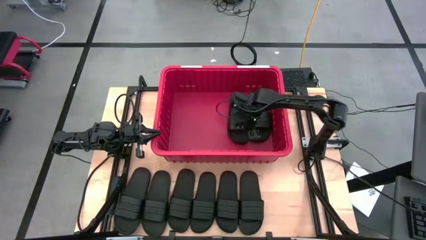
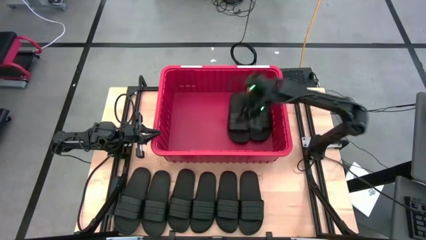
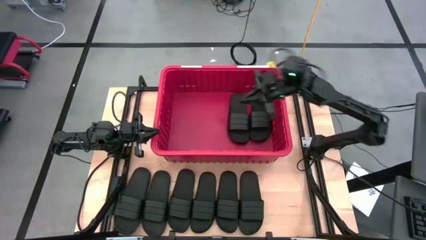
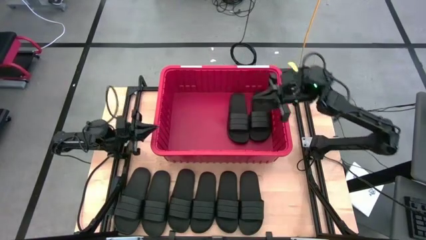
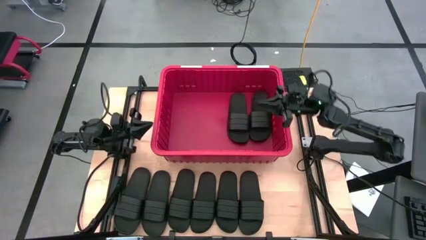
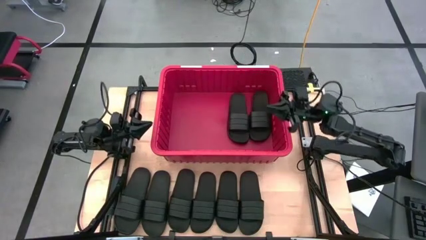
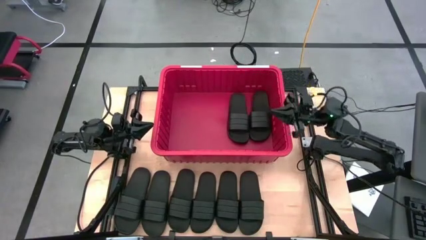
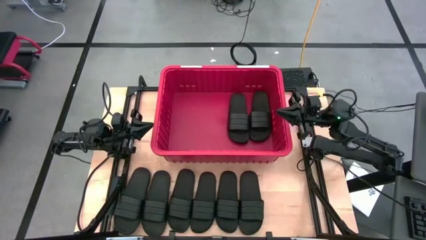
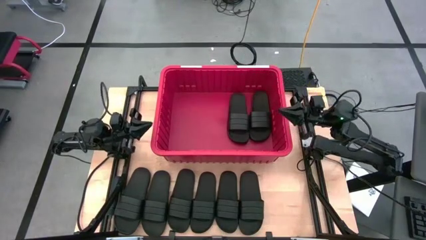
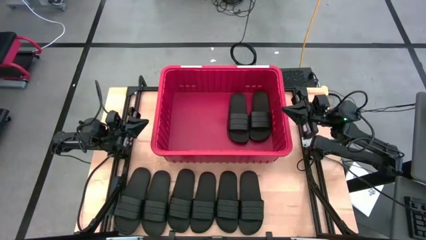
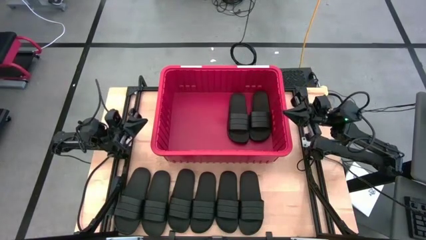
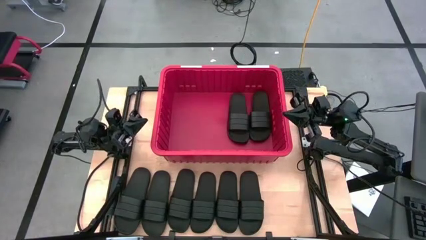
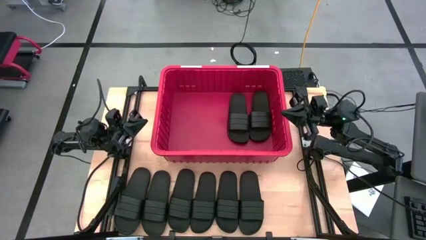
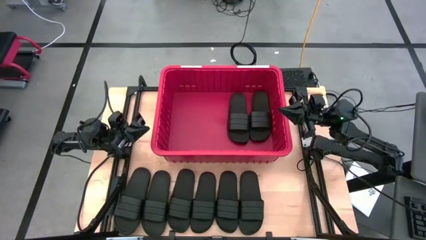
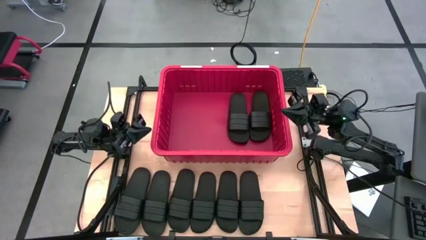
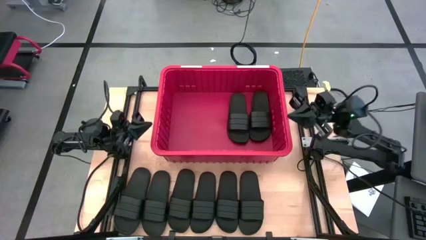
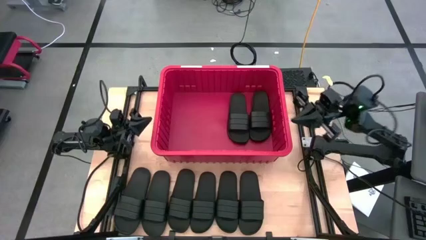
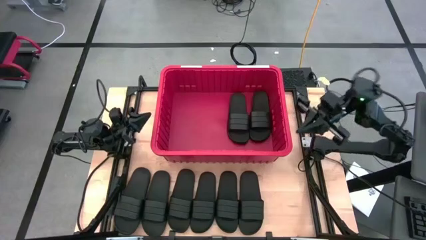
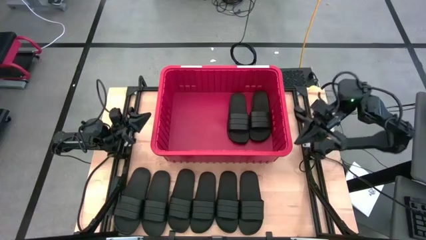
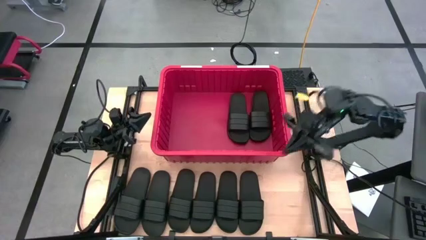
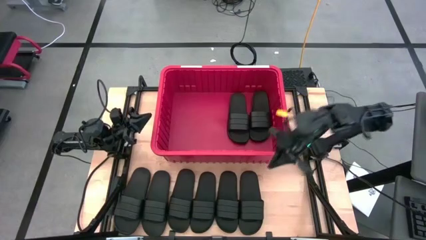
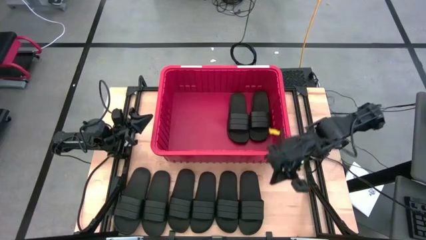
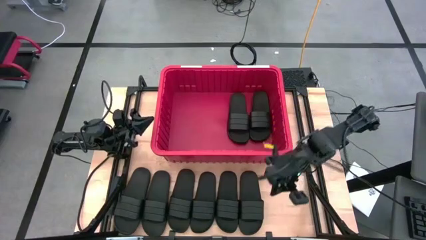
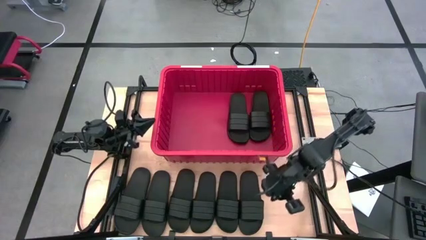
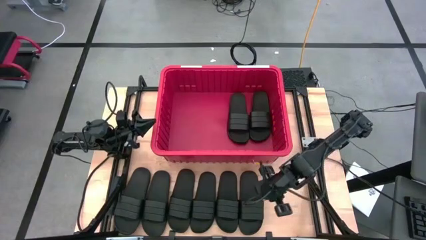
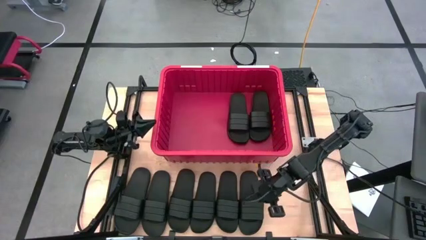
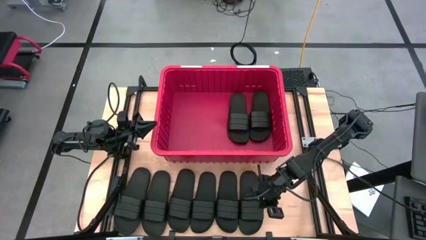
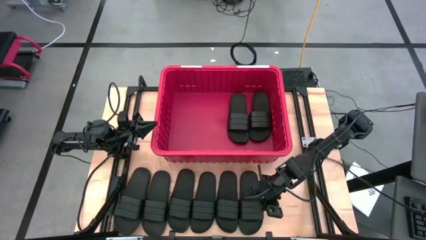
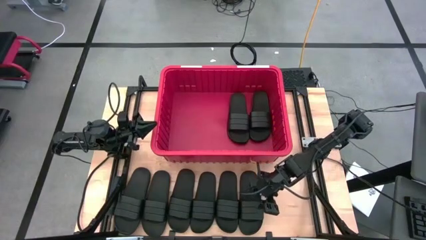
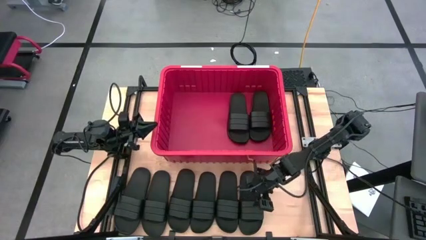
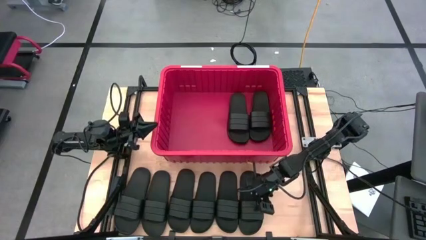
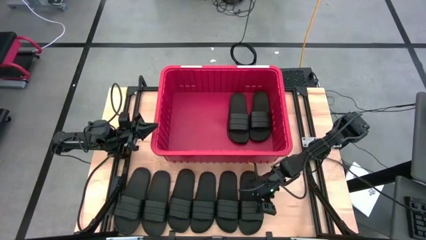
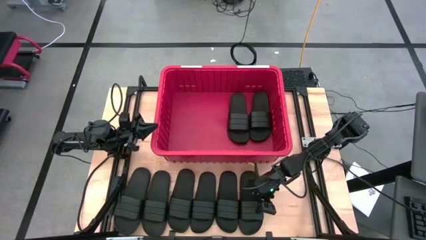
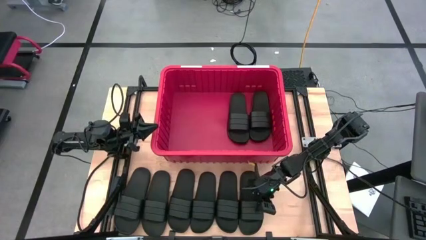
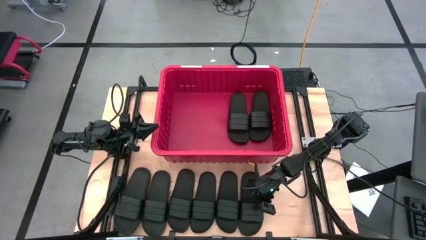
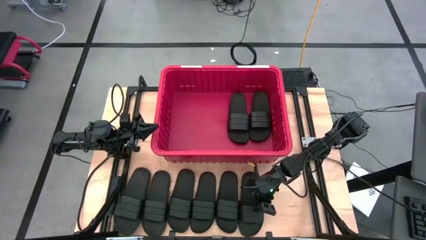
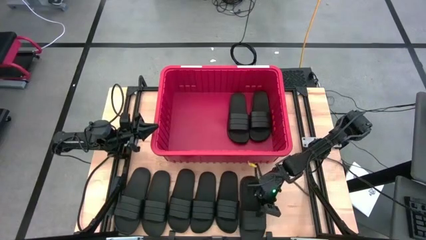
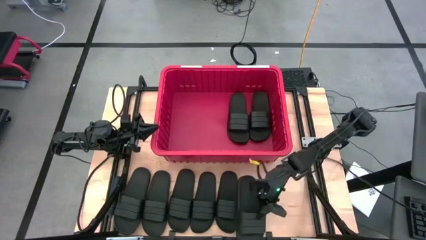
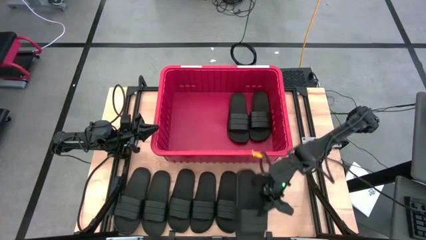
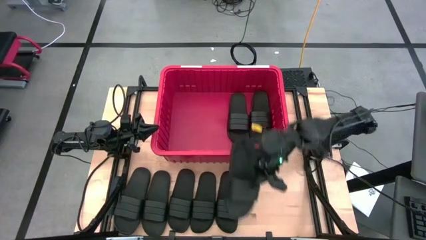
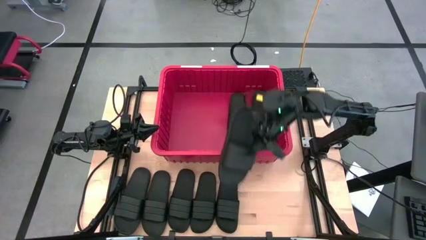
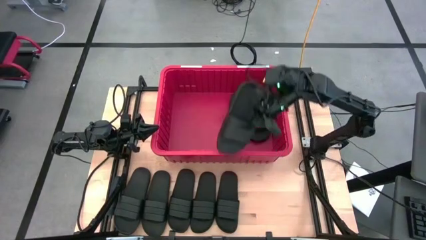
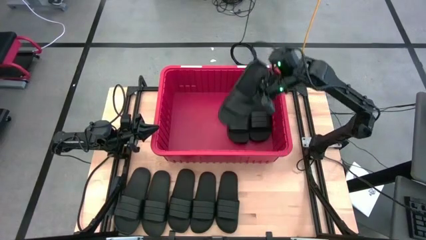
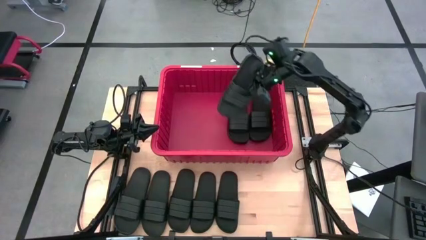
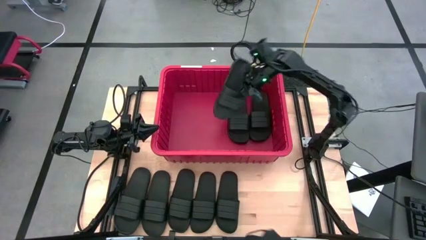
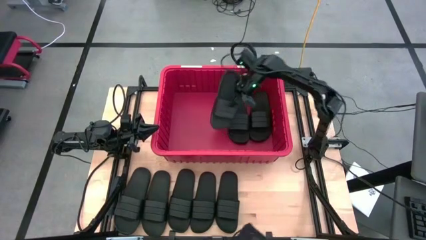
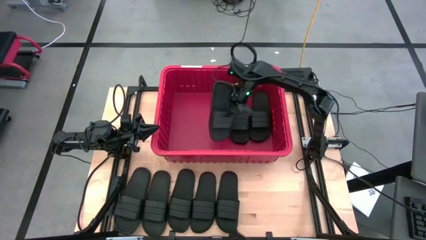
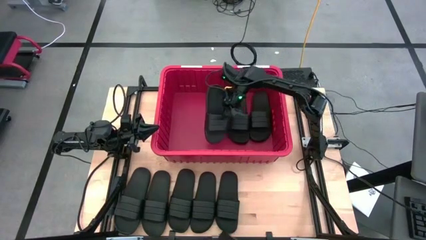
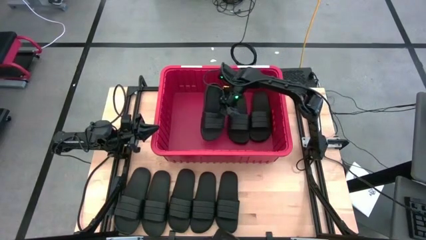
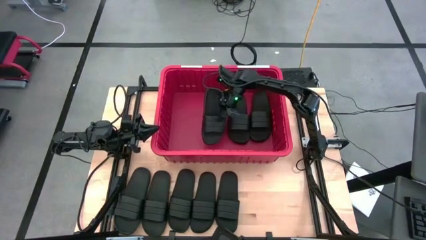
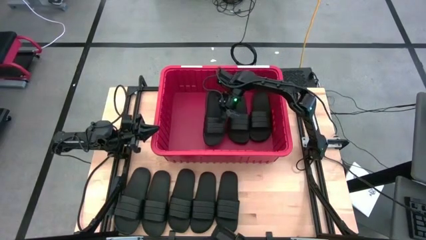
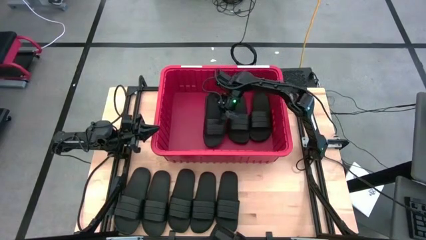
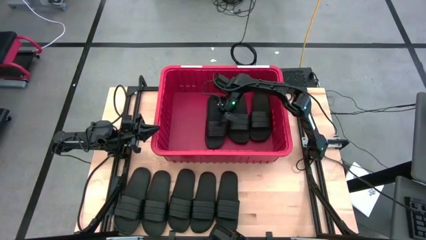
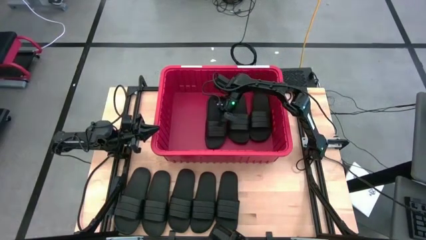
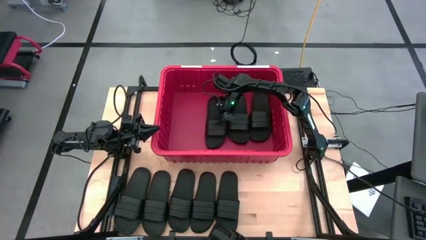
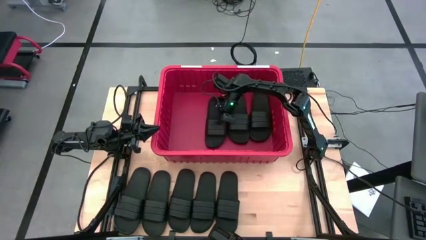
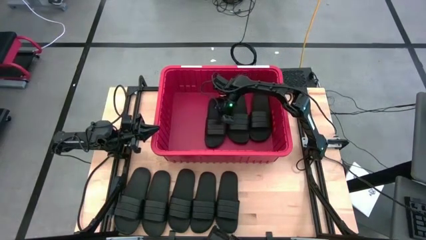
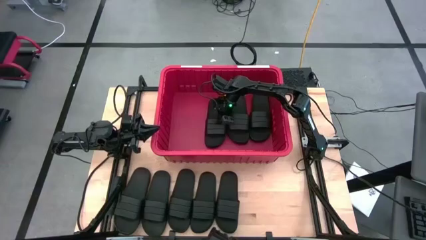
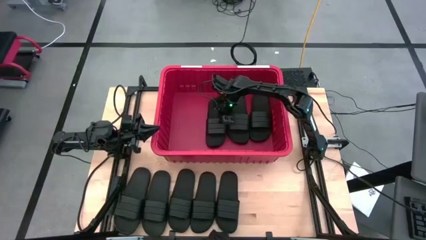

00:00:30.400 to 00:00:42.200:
Task: Pick and place slides into bin
Put the black slipper into the bin
